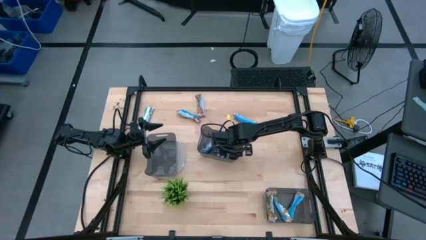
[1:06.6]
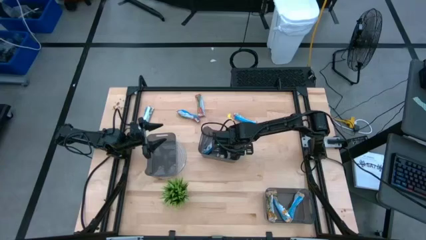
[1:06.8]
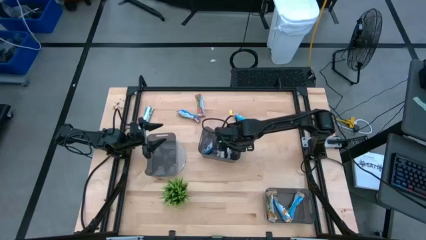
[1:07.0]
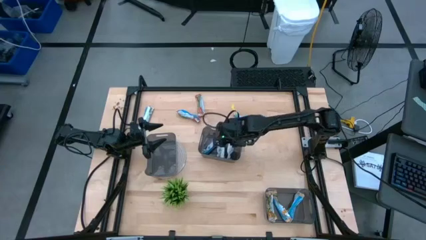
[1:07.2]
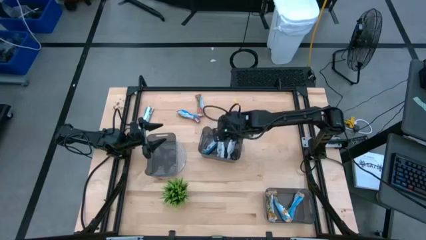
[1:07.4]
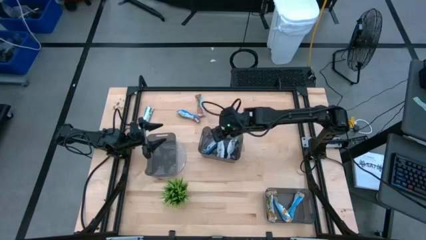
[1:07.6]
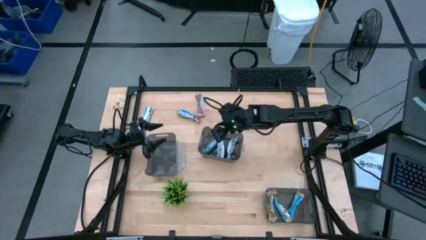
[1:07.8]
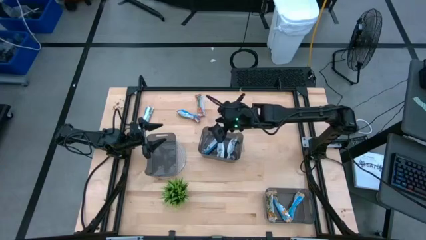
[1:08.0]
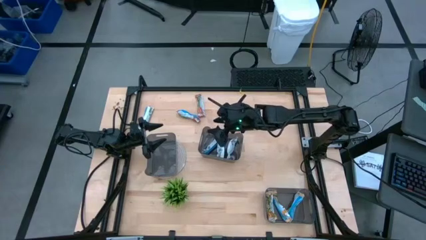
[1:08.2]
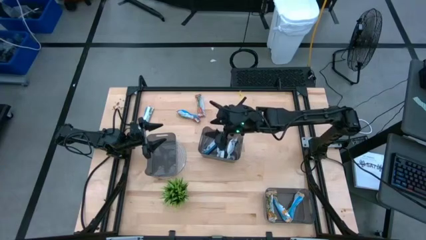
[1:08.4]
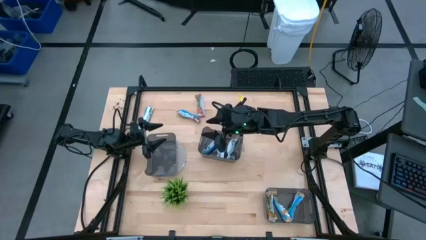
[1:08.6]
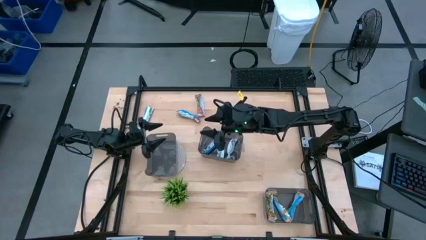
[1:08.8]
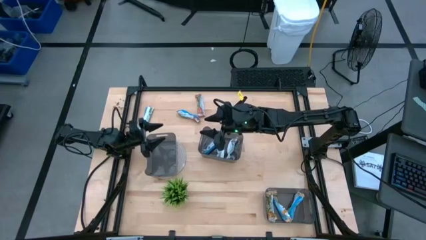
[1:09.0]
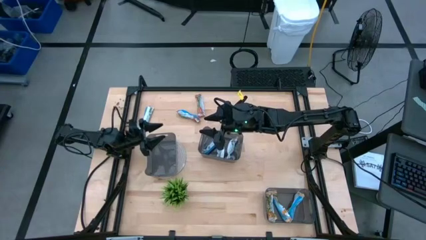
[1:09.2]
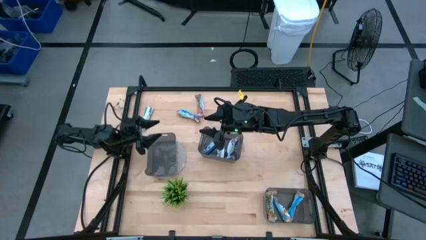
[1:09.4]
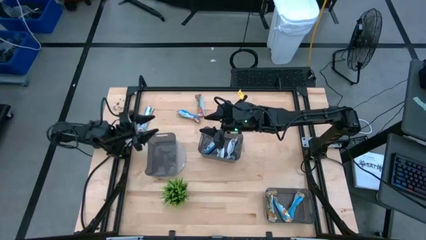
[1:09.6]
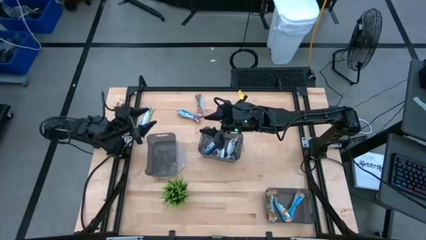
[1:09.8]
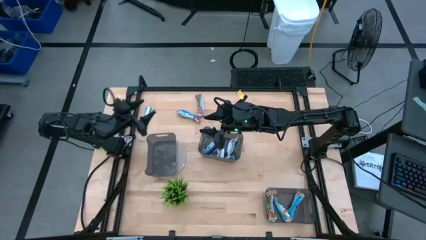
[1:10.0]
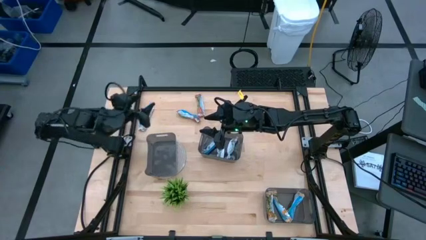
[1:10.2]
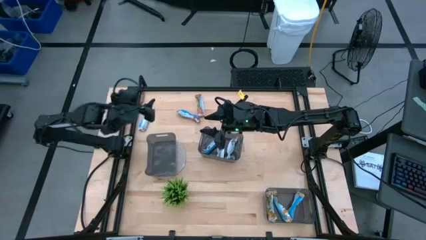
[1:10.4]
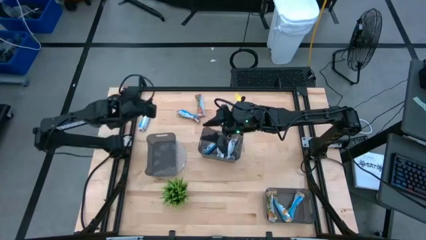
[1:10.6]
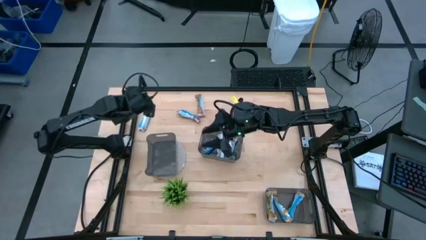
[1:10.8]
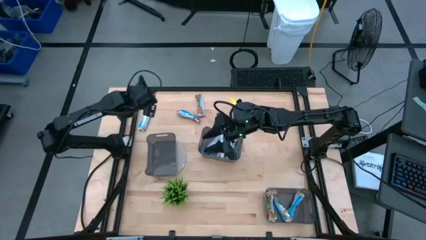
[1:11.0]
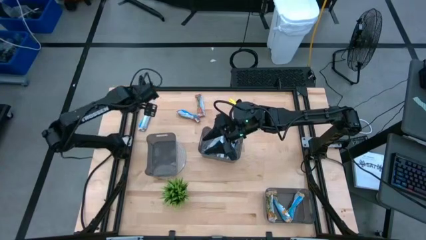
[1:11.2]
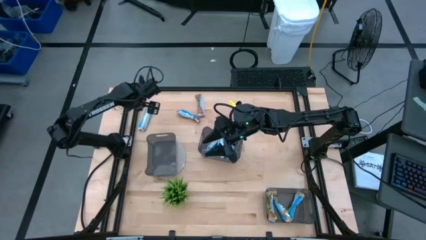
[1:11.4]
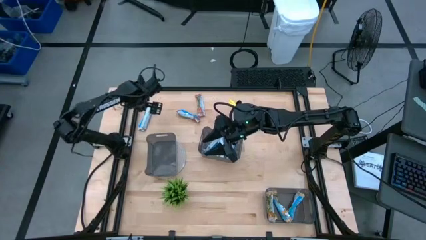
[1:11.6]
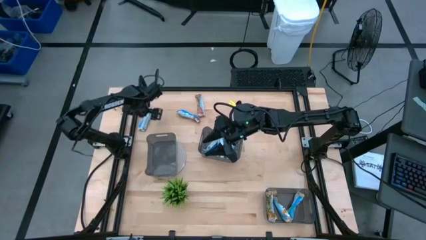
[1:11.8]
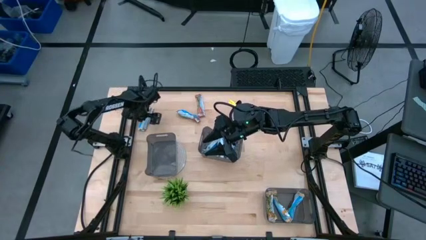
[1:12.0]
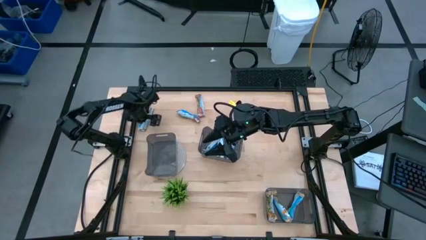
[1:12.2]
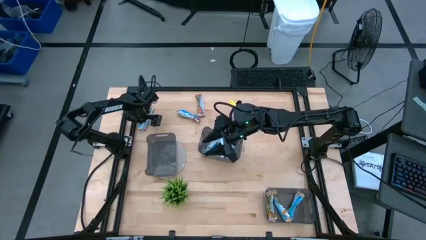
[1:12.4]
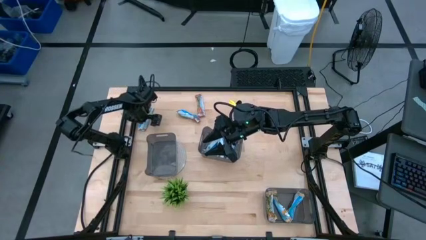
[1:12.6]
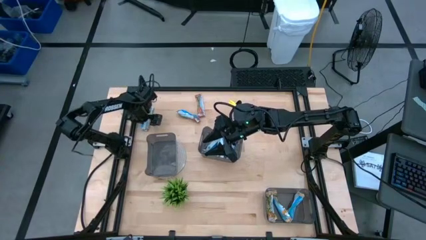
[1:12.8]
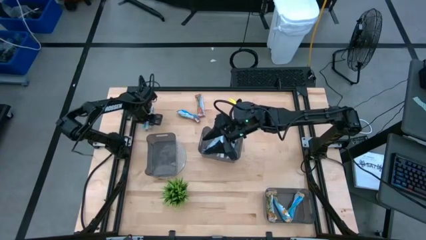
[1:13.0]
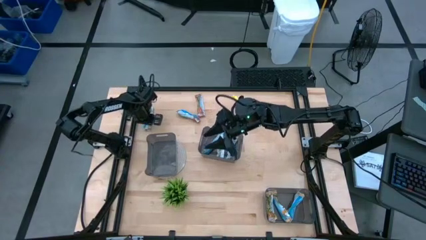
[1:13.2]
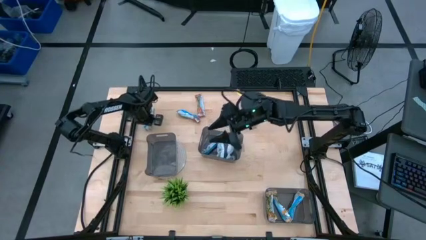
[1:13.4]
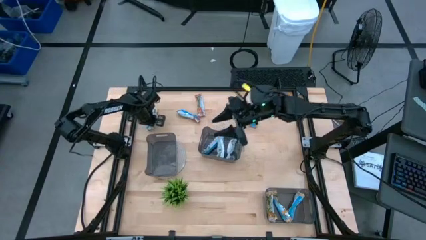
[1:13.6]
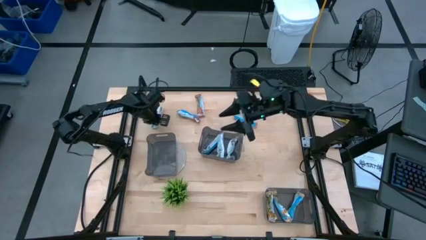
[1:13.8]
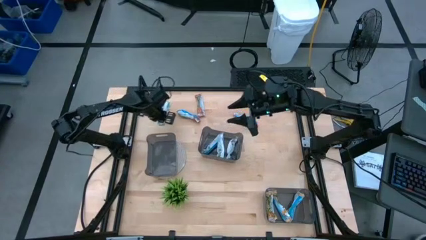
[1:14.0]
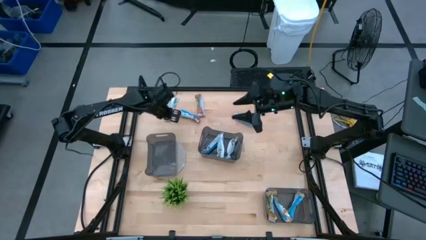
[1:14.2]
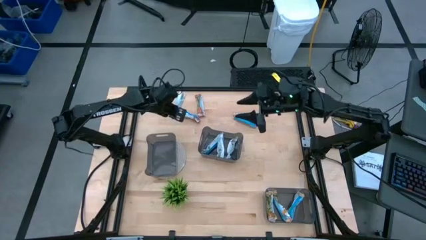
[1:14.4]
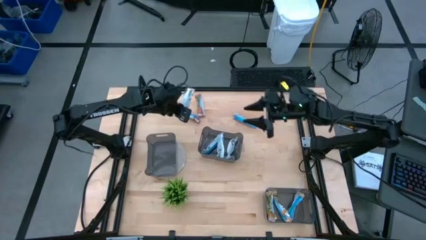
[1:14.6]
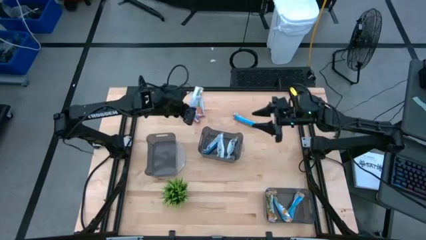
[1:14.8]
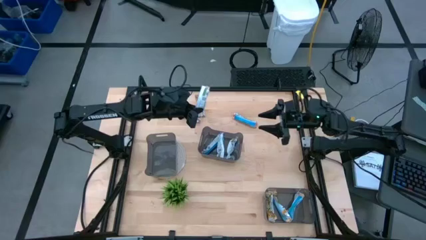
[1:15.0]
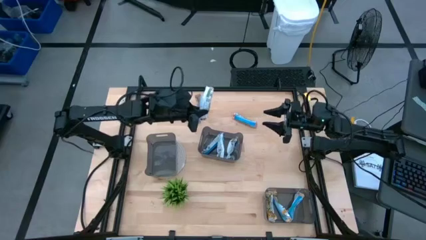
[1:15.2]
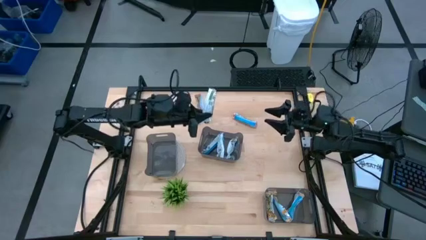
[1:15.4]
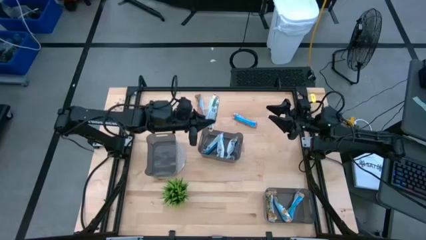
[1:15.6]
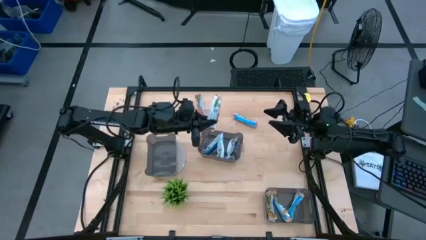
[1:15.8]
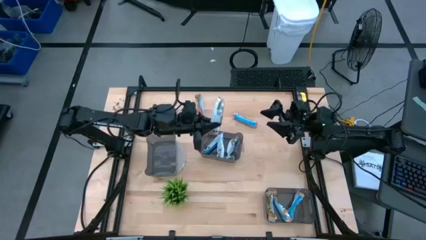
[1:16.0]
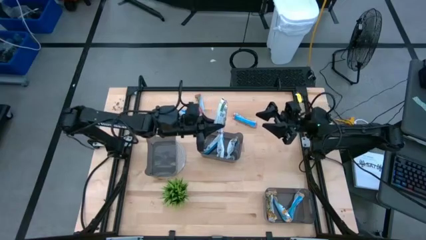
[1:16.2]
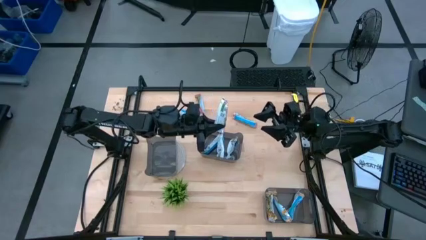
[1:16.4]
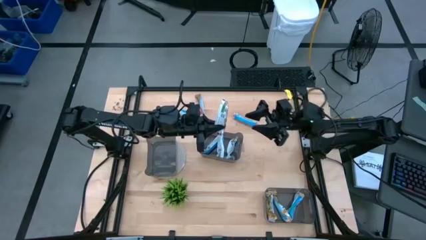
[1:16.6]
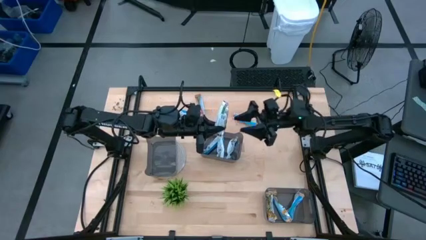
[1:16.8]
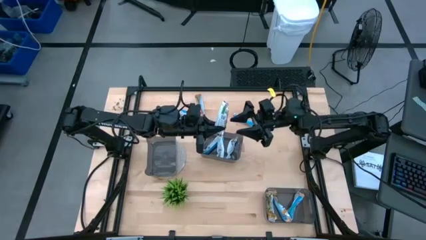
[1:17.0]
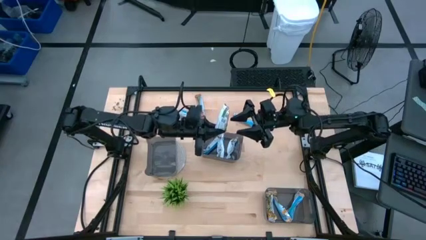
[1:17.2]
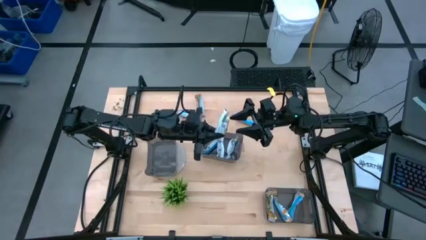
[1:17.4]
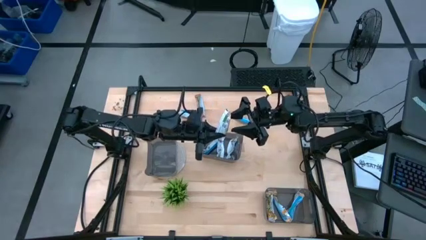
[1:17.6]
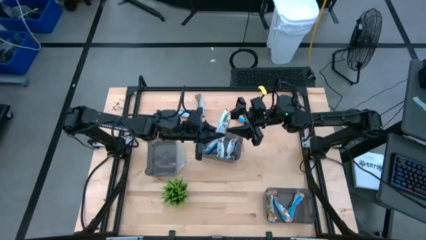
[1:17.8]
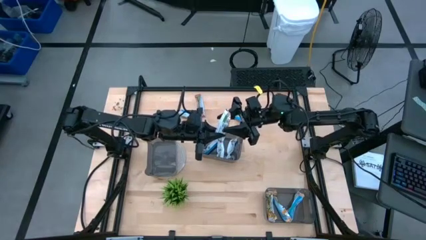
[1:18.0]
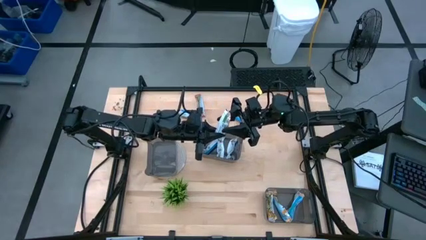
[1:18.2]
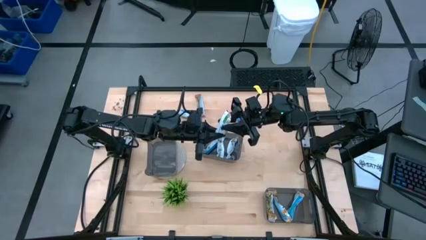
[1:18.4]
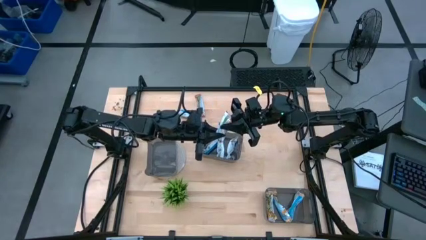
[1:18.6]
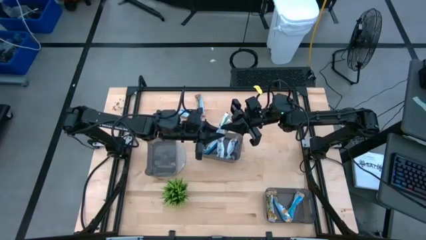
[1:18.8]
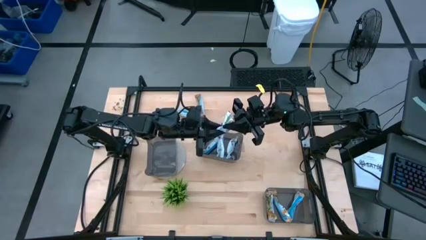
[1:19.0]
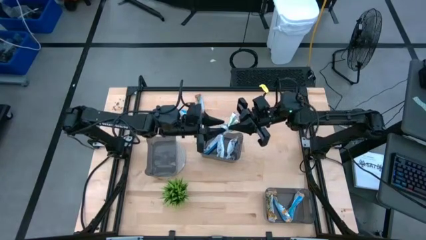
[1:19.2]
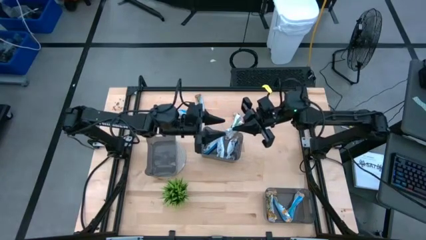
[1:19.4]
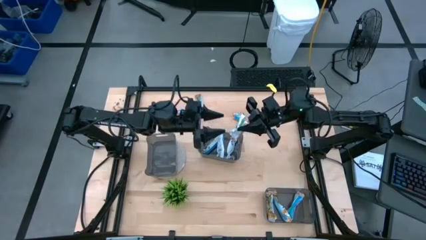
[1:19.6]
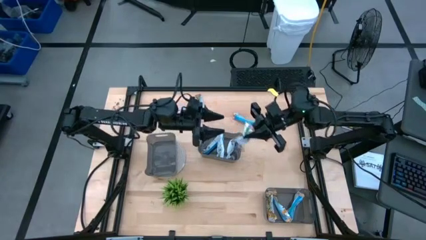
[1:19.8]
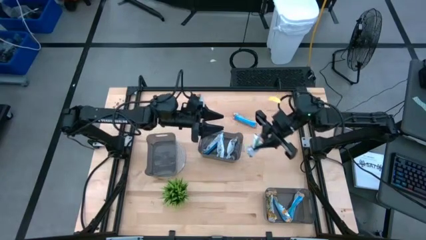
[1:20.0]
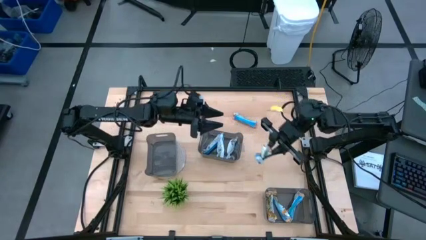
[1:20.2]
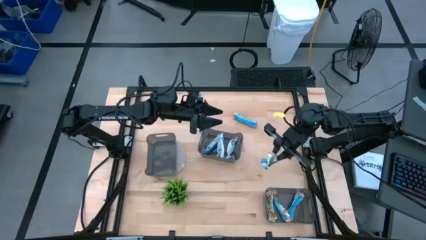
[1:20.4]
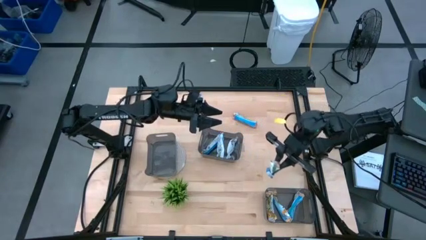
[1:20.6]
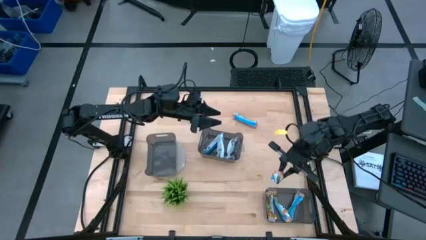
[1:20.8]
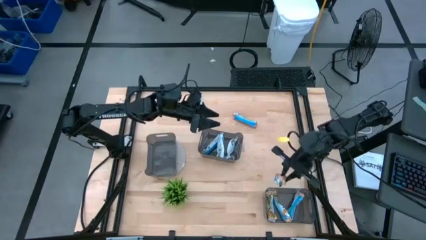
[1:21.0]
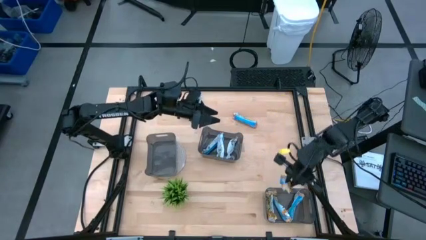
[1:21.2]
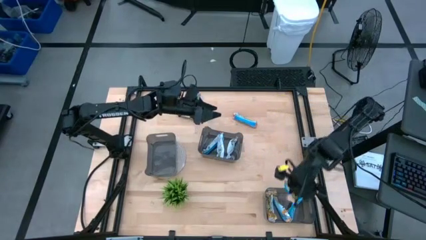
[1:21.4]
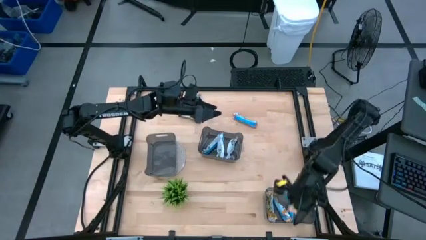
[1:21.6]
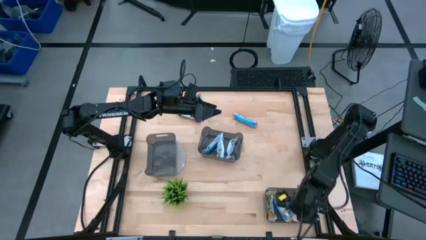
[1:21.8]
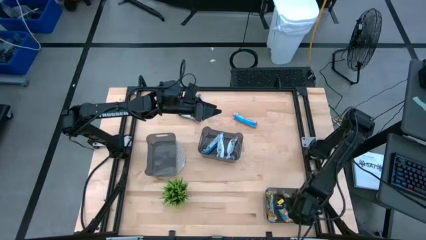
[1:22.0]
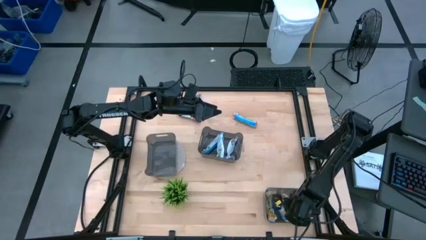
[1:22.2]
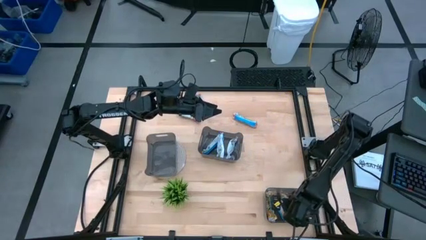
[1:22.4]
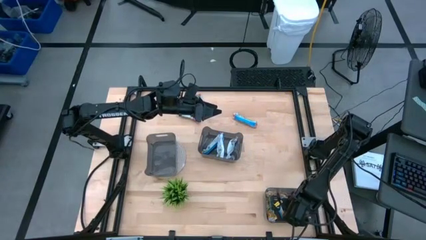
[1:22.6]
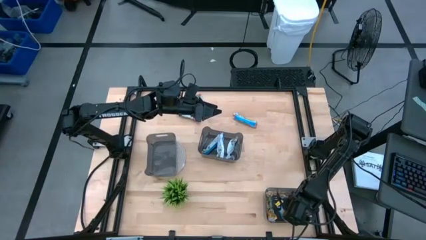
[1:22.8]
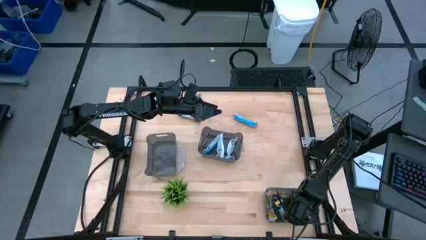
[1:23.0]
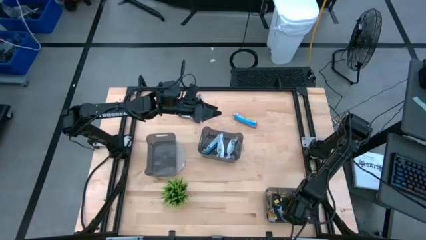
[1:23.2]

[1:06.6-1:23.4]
Task: Pick and place Granola Bars by type
Put the orange granola bar into the bottom black bin
